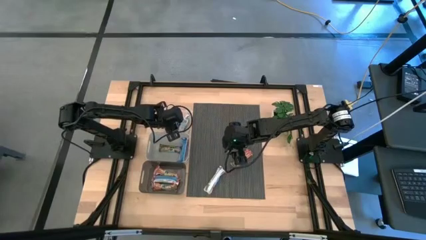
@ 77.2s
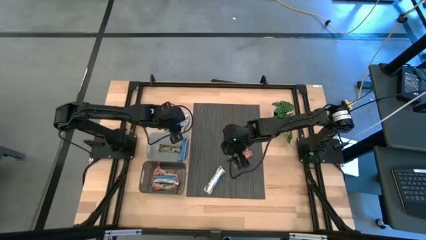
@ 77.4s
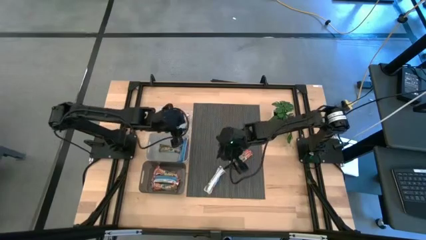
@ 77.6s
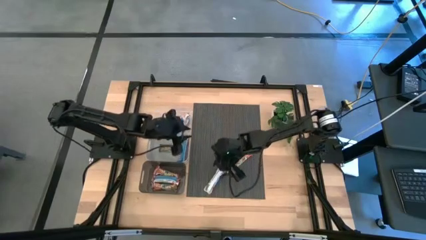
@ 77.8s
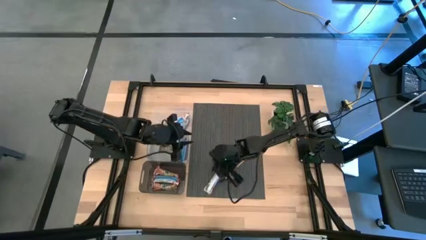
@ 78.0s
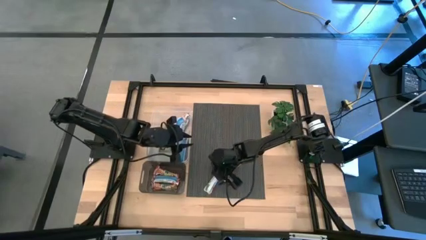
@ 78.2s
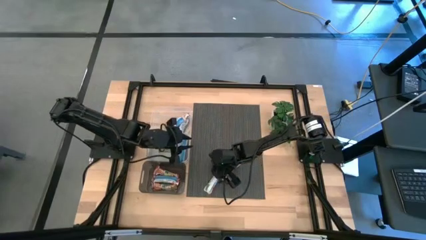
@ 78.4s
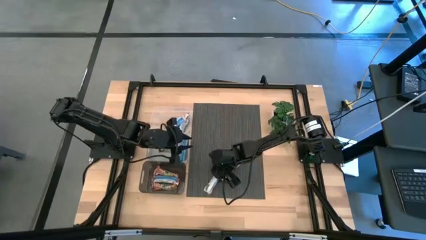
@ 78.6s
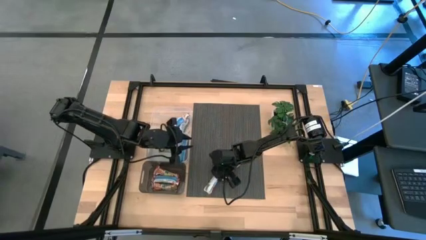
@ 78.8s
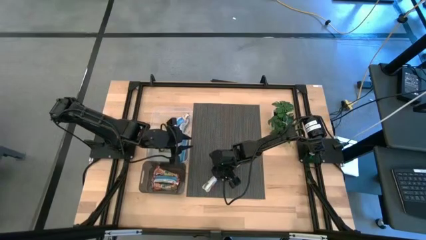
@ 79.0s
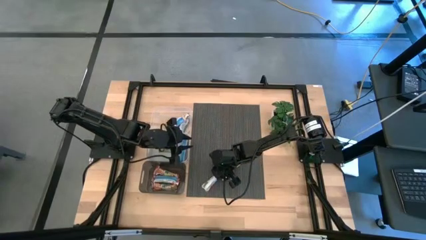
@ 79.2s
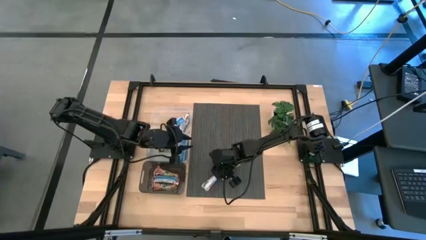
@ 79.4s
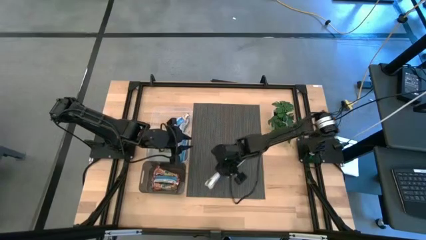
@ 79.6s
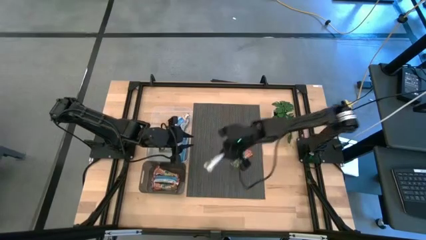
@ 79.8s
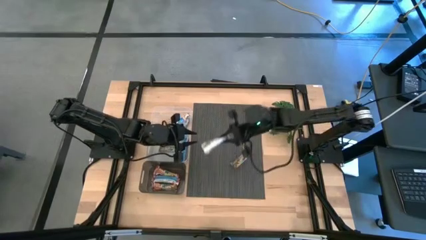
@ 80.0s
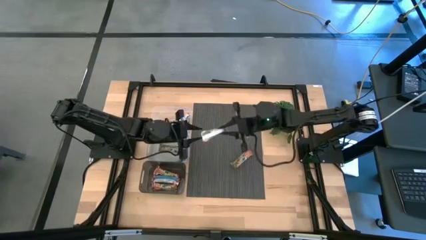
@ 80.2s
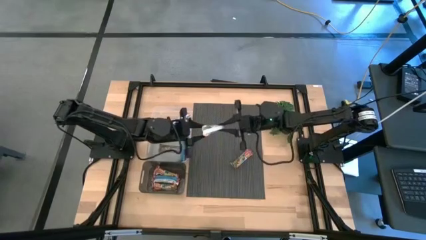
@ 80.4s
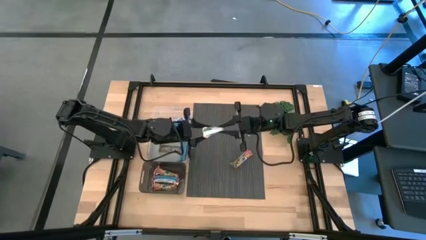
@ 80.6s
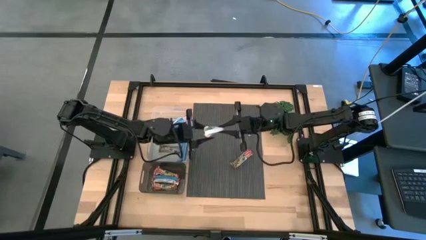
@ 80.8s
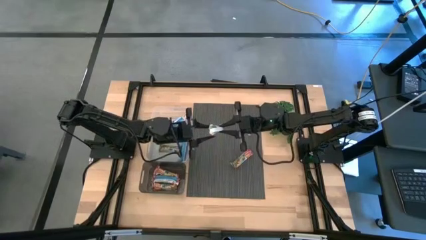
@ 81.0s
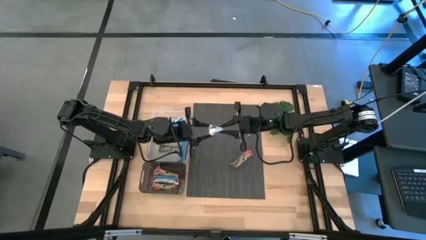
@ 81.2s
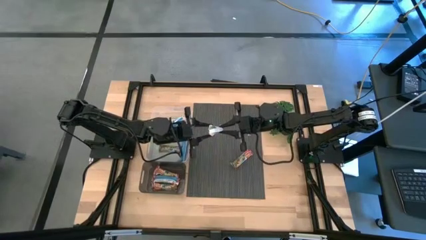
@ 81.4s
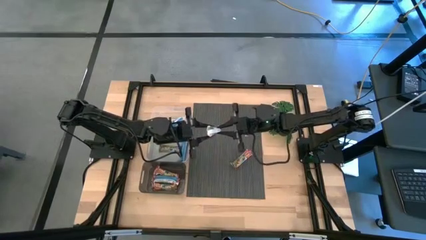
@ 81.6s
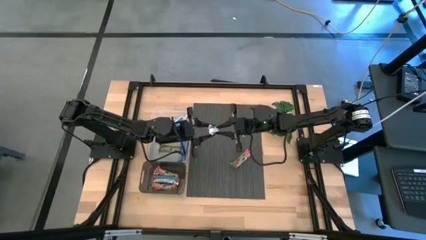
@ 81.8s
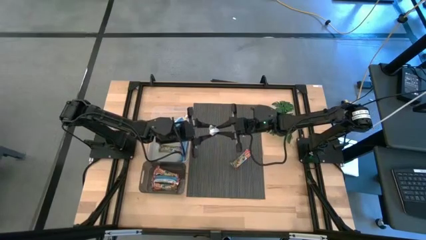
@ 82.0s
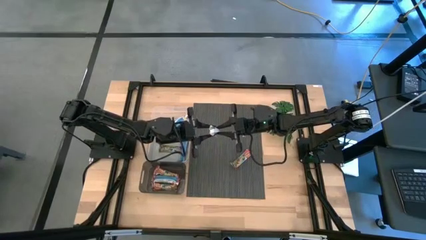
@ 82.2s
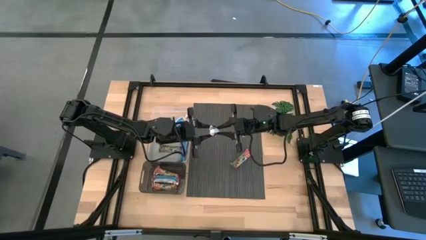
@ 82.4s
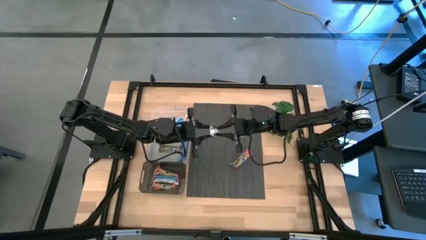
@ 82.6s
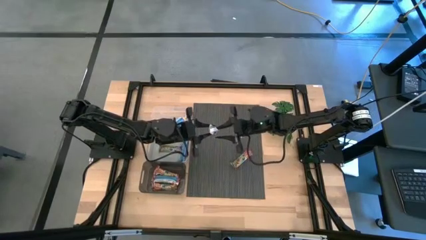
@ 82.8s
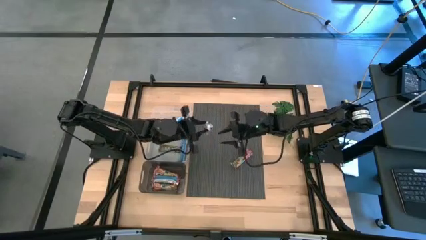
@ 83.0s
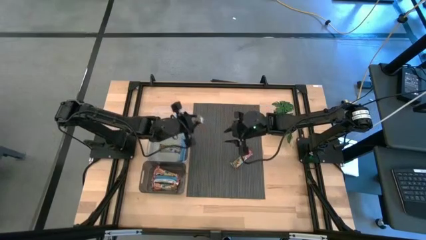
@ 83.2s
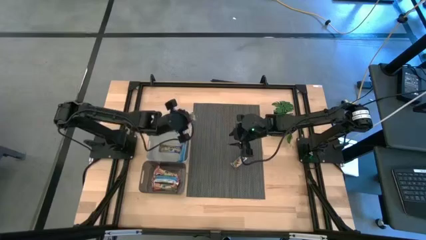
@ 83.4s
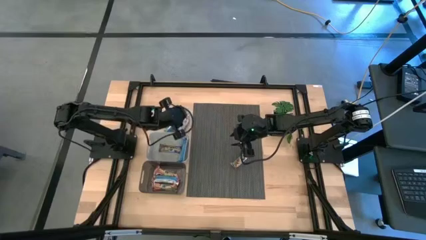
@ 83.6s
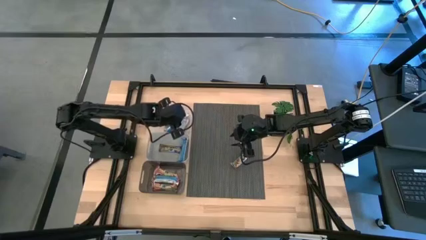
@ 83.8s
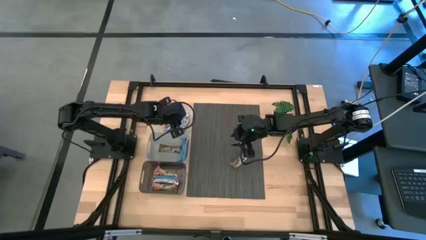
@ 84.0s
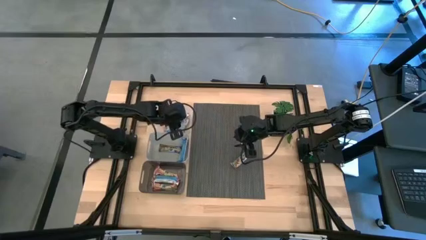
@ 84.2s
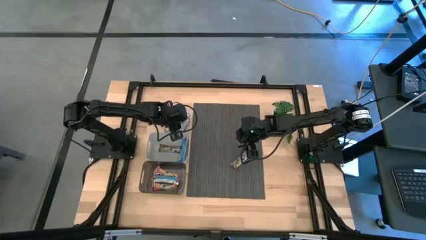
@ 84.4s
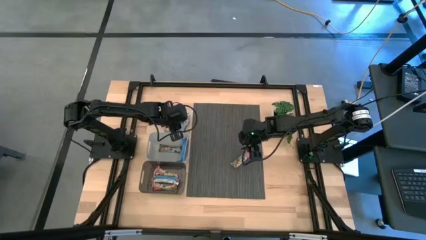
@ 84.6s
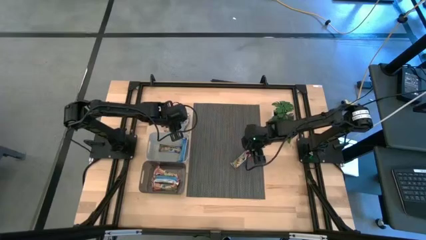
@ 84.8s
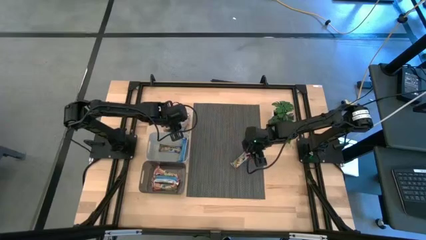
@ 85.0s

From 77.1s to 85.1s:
Task: Pick and place Granola Bars by type
Put the yellow granola bar into the transparent bin

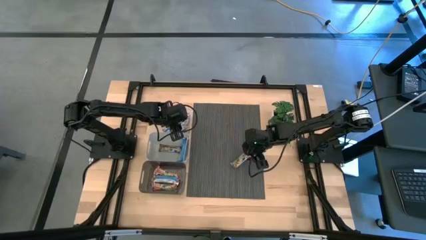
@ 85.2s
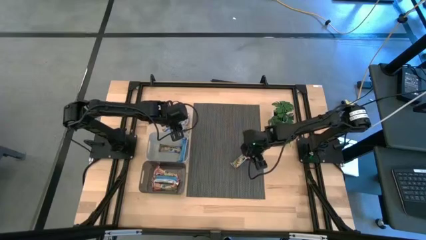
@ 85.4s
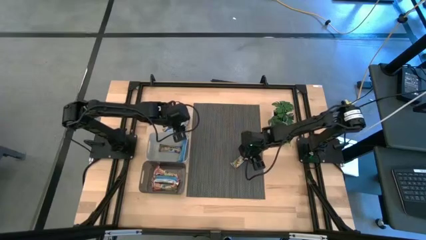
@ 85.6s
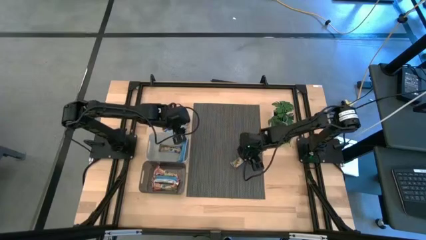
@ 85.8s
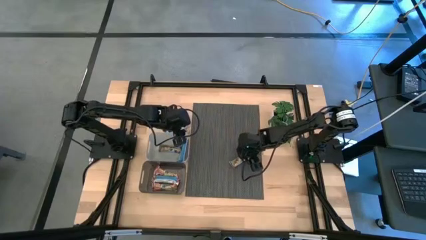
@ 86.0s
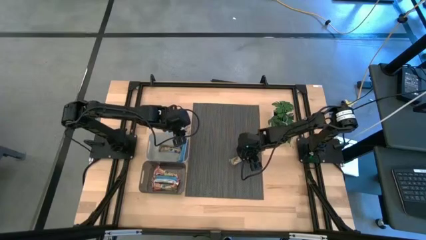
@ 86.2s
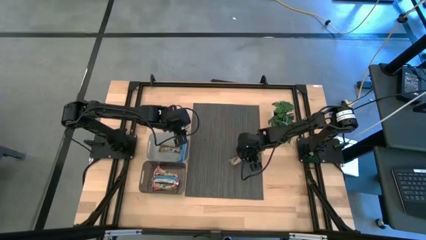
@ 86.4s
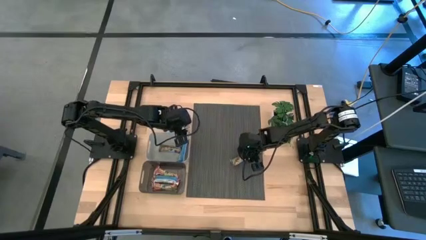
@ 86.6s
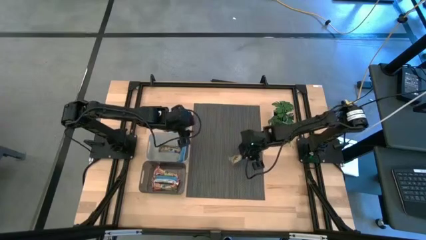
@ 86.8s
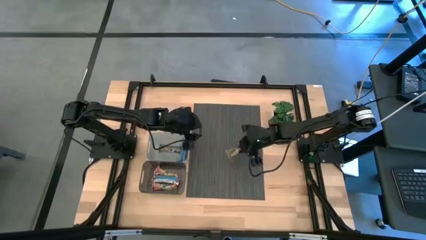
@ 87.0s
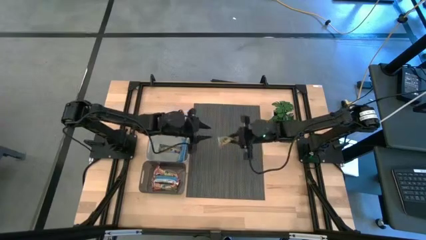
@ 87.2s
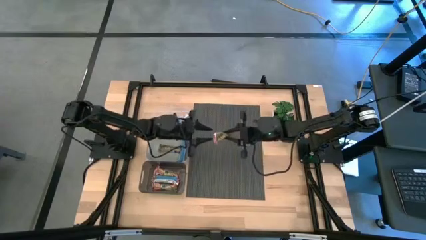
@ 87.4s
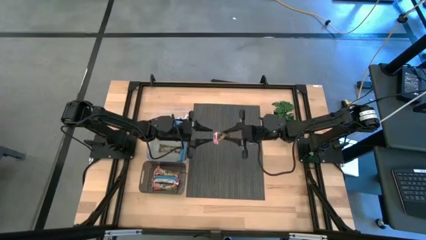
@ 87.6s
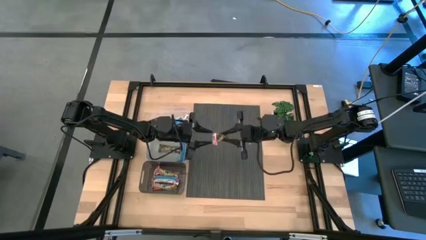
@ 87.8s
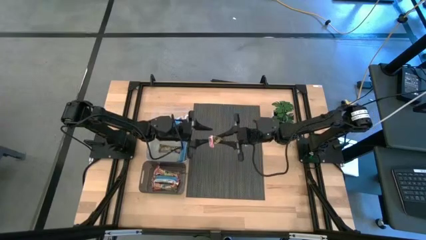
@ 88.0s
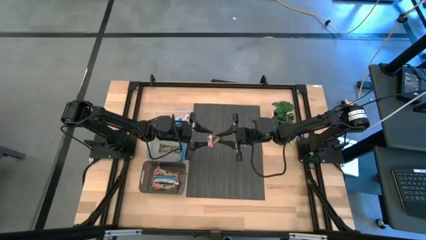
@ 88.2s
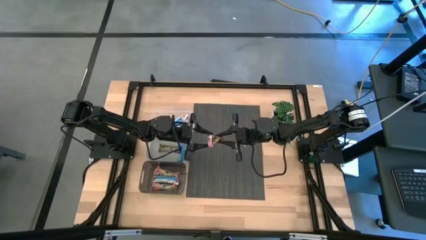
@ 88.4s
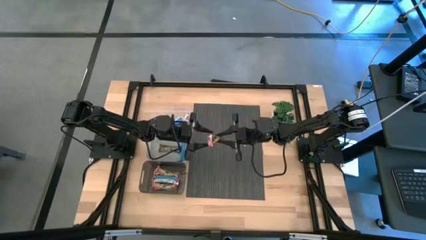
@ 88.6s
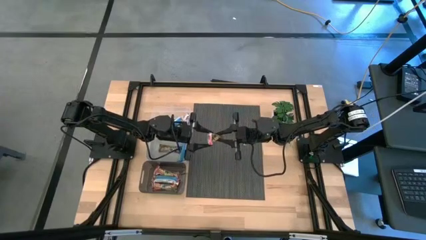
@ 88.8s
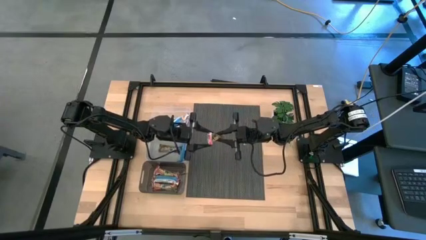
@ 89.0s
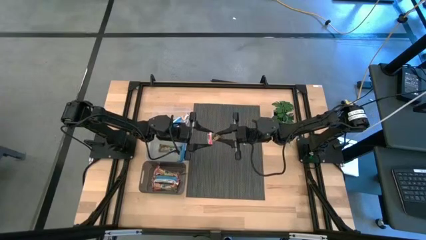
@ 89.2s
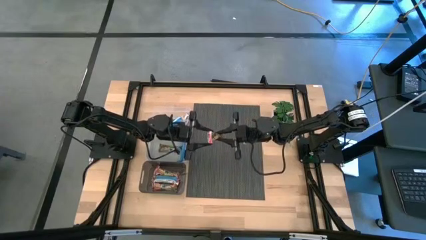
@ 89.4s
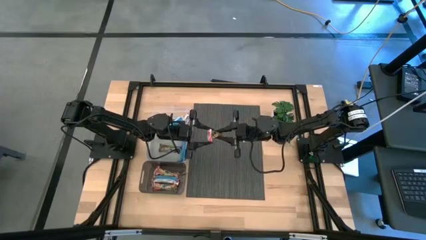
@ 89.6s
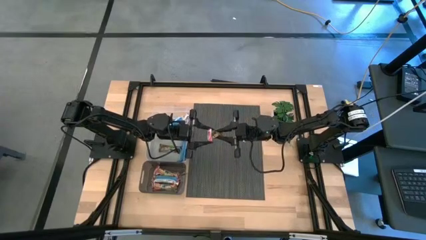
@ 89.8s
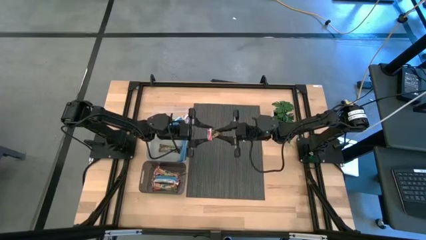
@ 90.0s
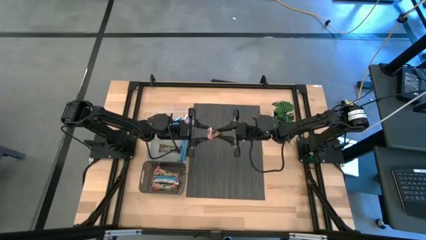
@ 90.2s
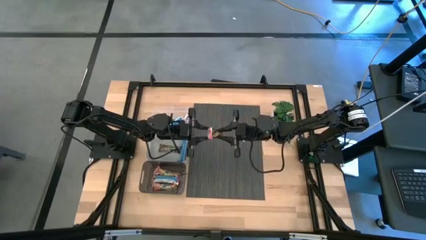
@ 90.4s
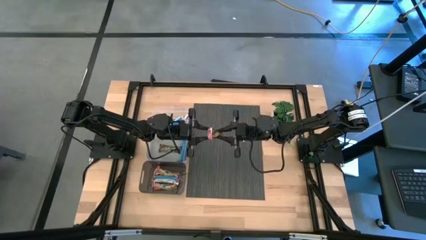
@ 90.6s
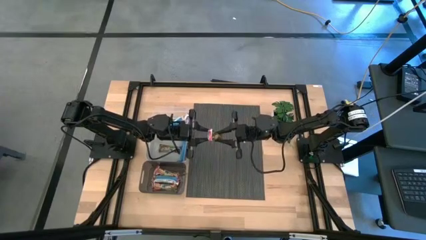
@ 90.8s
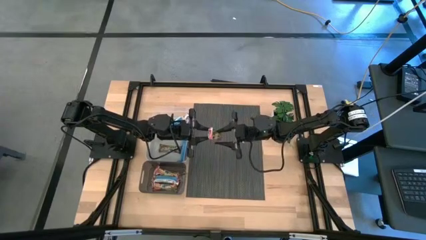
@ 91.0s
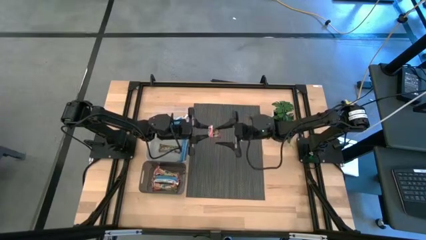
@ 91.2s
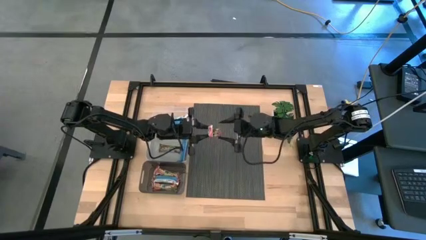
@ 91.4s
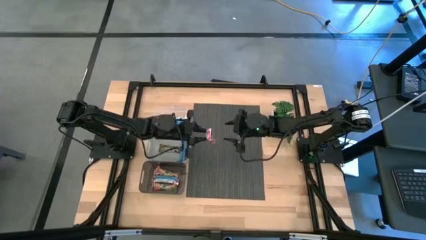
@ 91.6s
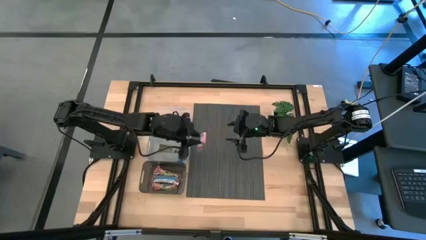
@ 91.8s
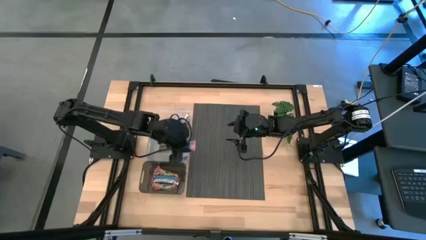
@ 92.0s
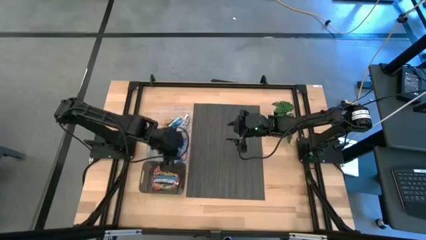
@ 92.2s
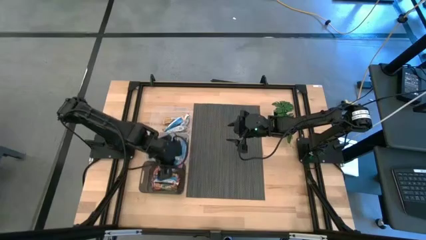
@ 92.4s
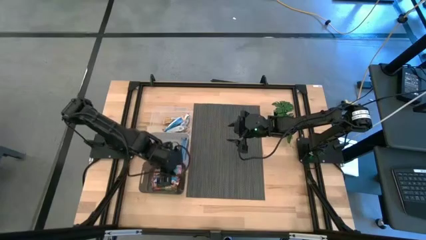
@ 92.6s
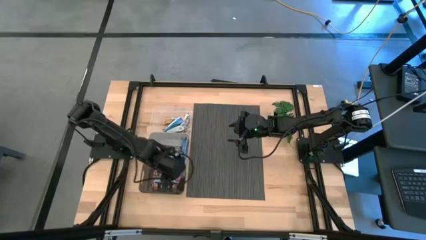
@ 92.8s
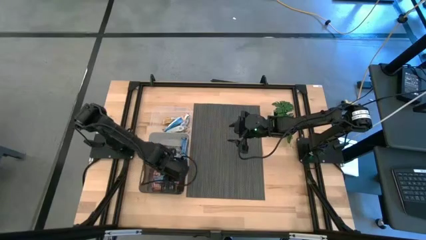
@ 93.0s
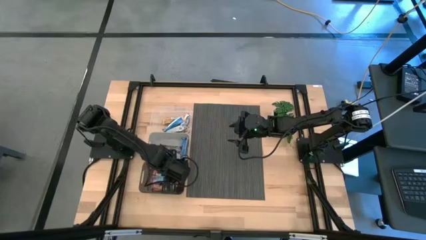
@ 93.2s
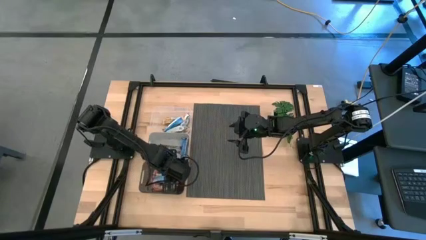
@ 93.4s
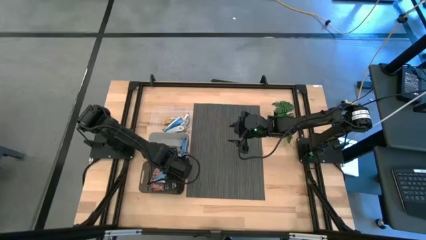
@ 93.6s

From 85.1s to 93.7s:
Put the red granola bar into the black bin
